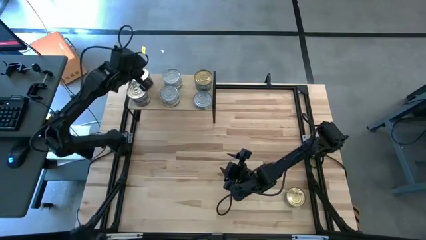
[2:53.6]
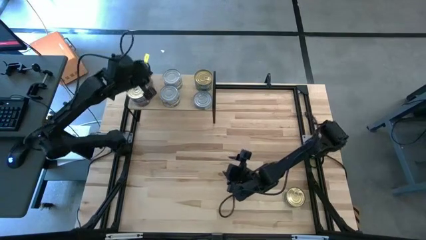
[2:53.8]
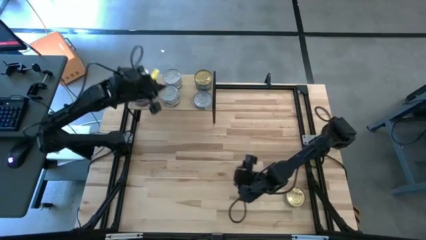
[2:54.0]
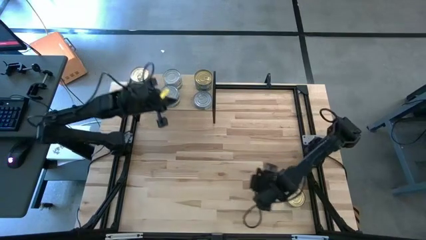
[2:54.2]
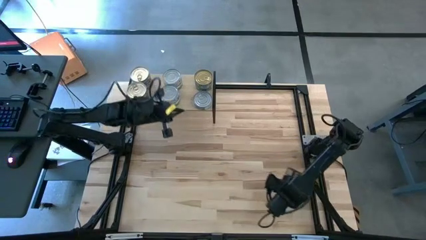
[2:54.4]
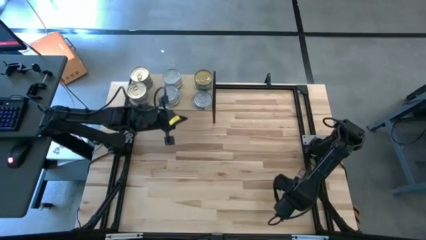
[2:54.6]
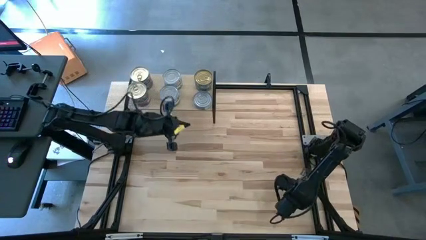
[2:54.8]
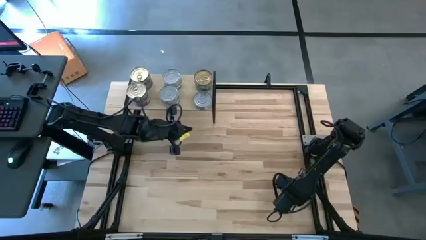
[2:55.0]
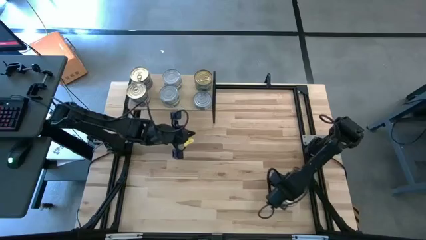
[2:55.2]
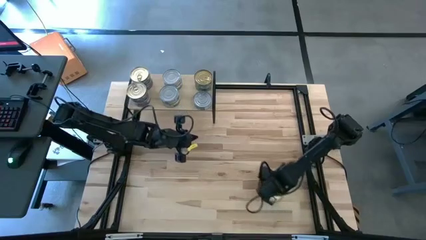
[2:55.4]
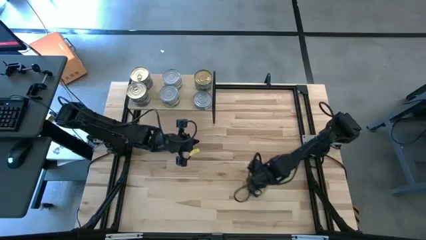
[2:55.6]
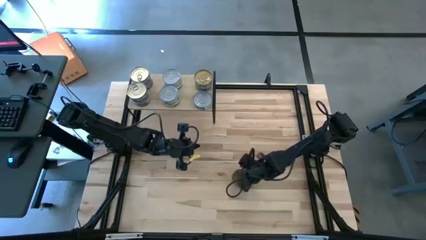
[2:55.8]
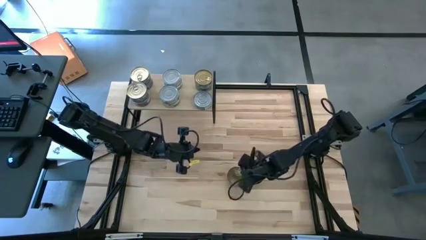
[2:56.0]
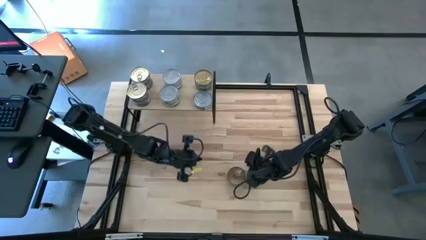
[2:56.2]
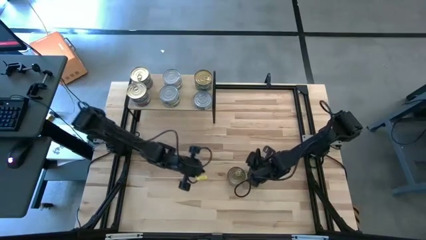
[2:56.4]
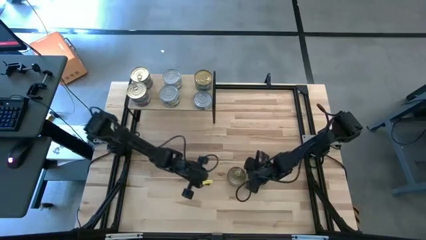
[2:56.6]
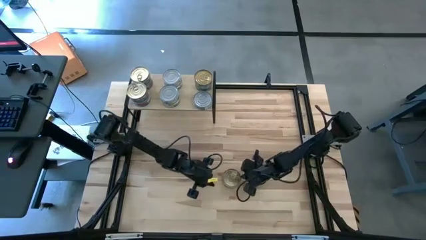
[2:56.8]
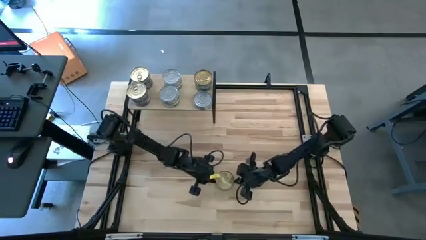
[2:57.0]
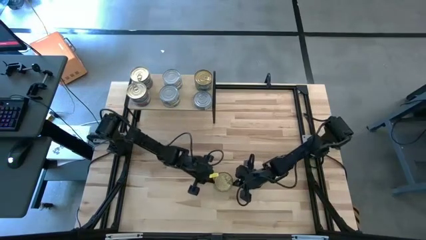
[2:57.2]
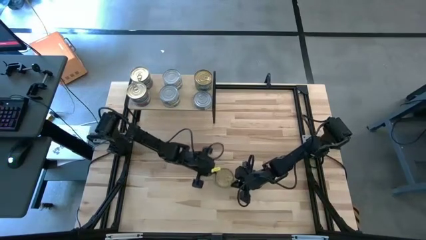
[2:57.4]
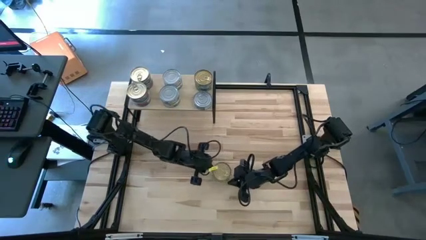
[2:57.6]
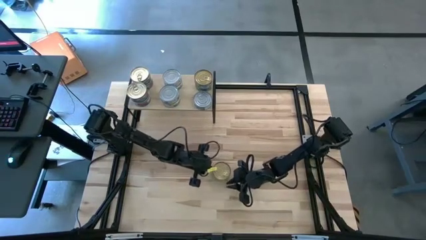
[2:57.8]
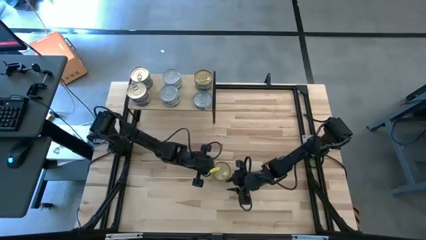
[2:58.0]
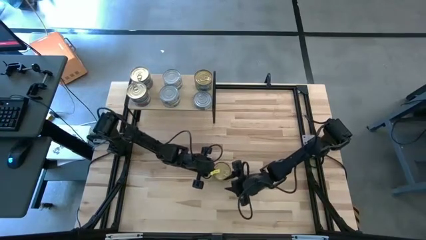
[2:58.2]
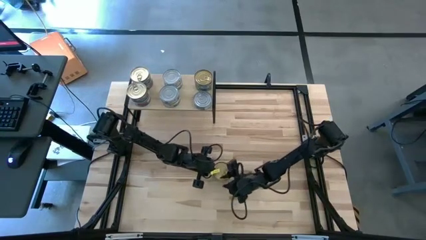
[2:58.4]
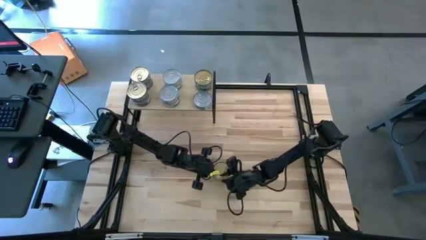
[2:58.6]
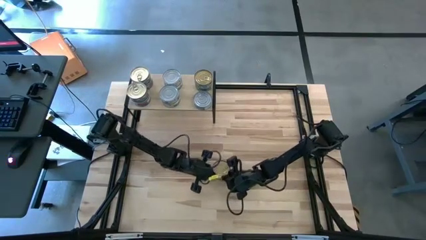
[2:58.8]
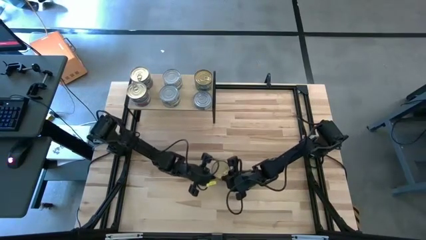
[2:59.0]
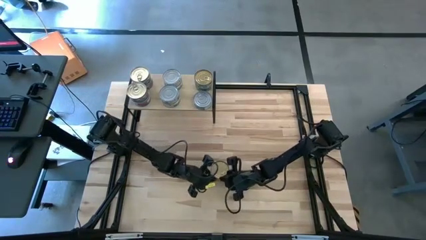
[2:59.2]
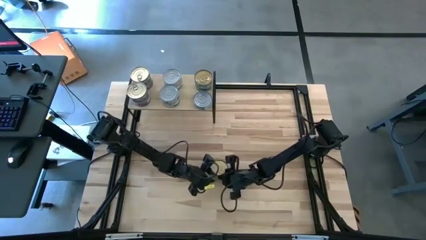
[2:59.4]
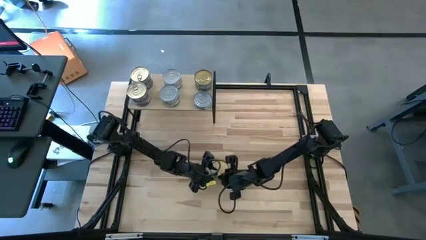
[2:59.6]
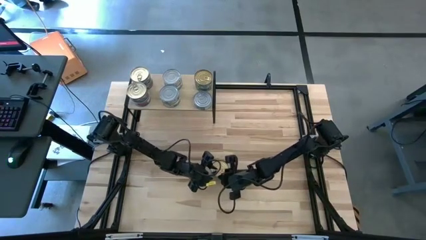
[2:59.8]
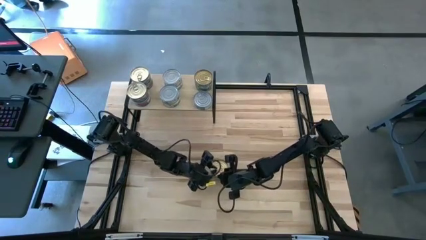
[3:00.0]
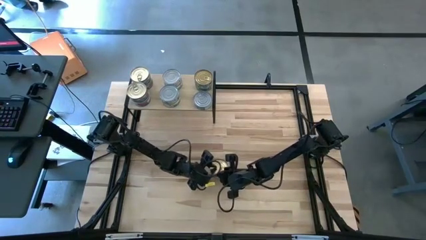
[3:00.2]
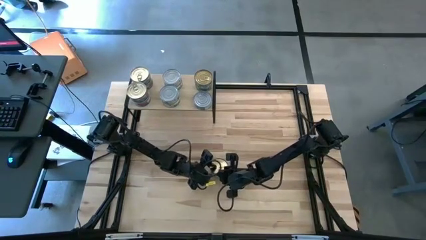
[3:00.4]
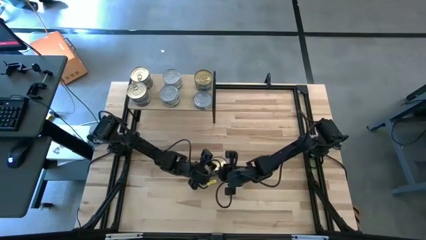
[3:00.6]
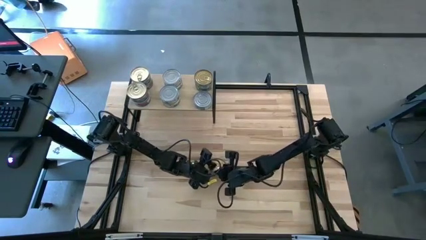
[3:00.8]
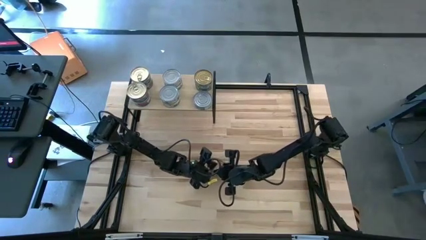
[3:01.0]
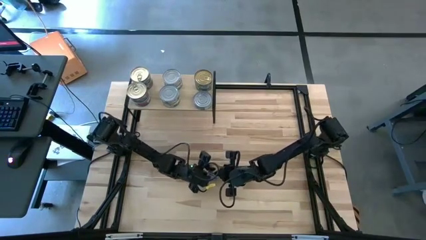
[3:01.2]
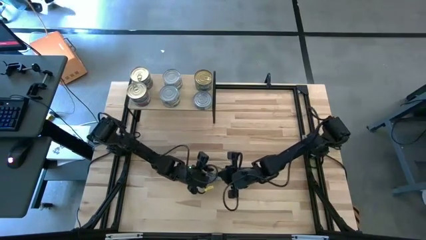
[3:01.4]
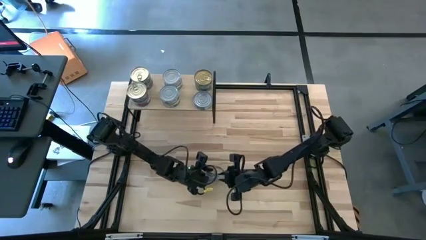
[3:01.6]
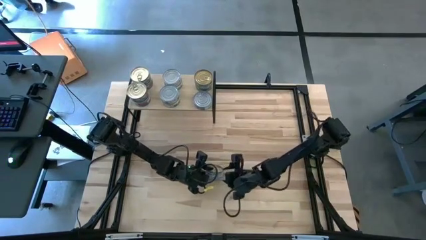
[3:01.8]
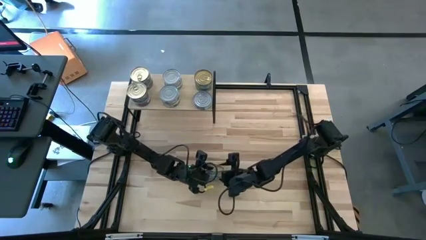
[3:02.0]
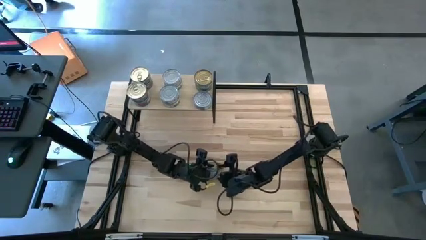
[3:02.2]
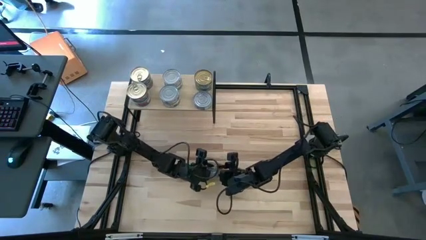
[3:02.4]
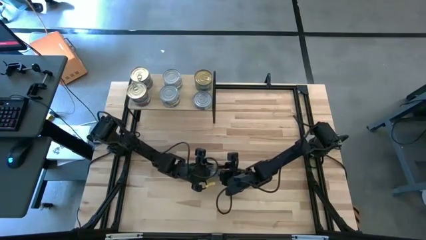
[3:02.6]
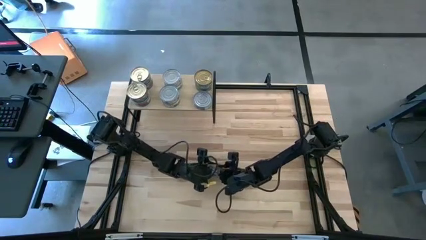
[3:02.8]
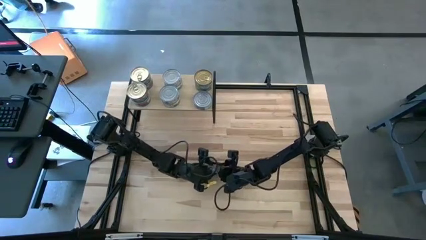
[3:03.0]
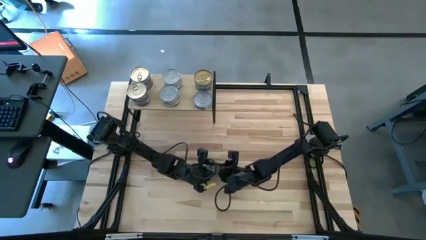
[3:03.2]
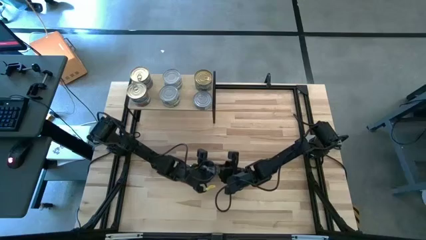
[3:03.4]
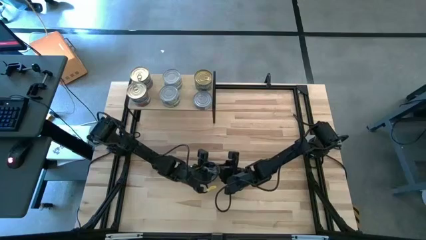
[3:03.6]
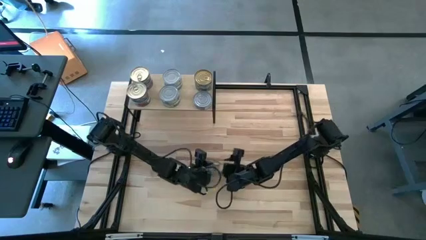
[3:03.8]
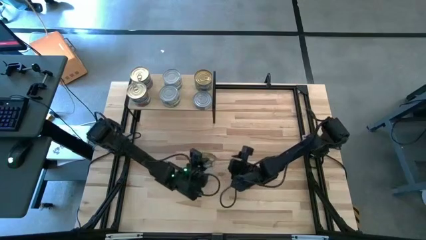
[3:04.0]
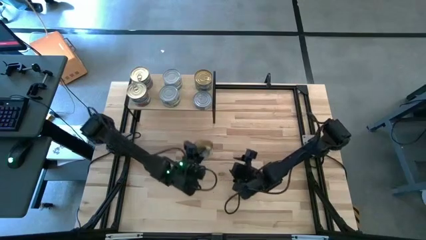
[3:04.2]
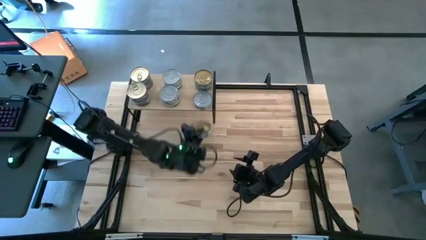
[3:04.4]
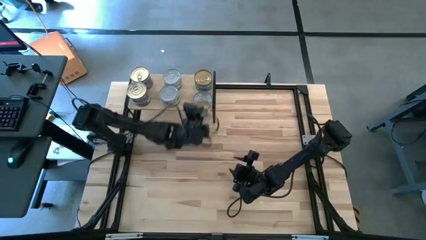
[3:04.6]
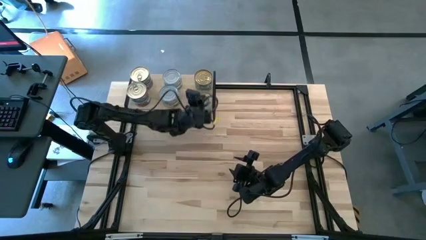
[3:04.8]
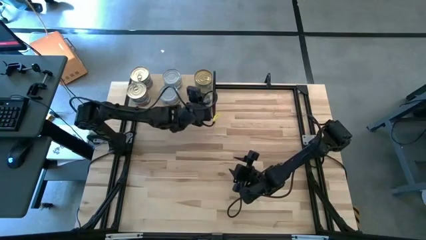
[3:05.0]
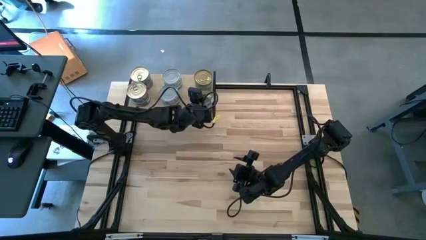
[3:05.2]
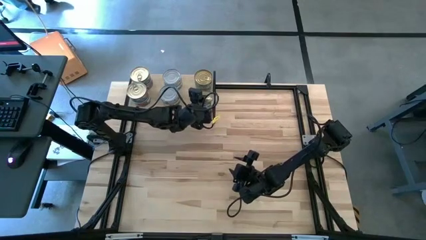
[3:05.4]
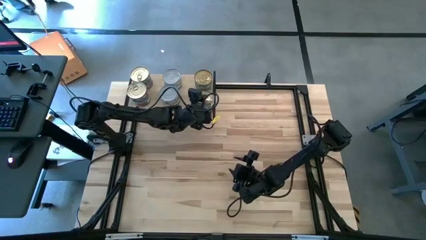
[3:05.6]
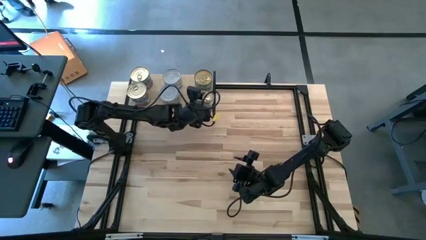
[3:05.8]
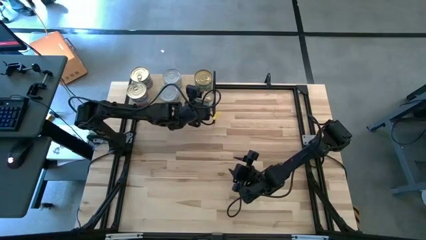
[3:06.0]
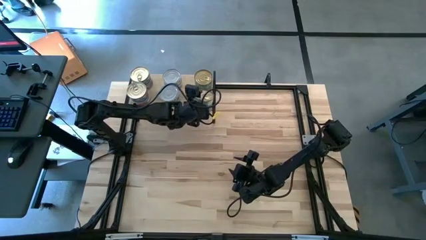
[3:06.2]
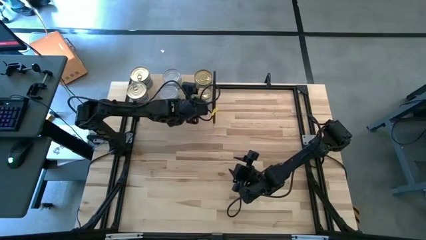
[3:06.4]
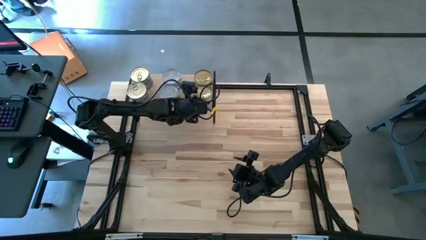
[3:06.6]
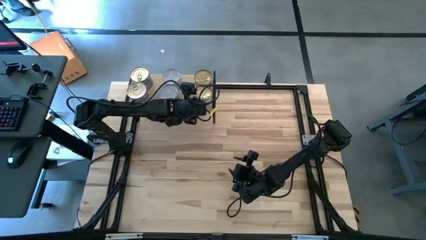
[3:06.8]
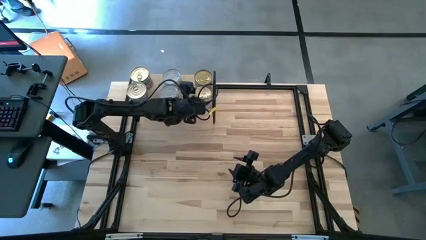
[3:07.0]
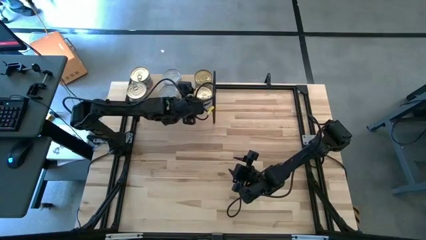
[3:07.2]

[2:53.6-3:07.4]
Task: Stack canned seafood by type on shelf
Stack the green blue tuna can on top of the other green blue tuna can on the shelf
